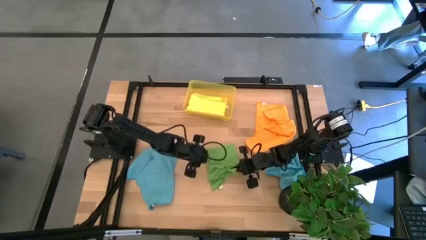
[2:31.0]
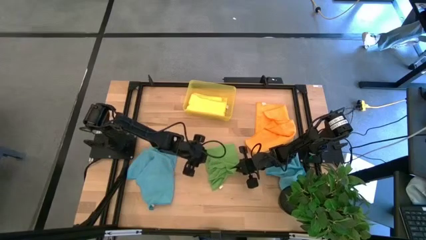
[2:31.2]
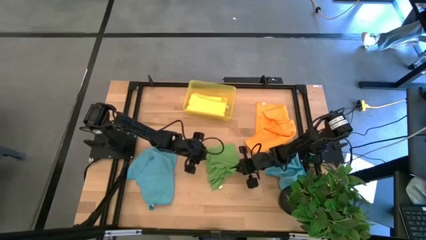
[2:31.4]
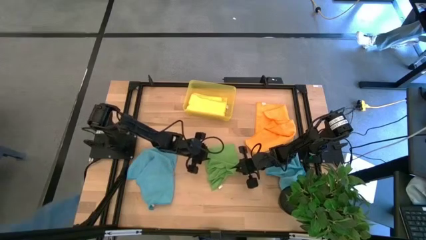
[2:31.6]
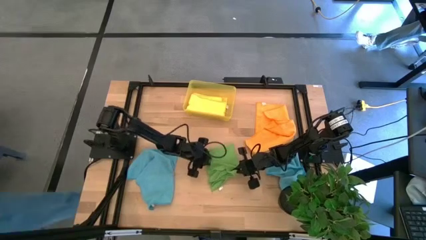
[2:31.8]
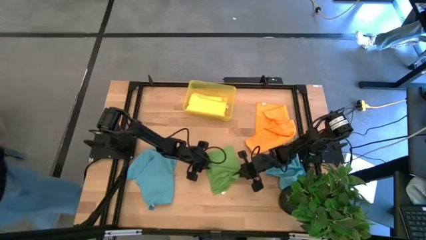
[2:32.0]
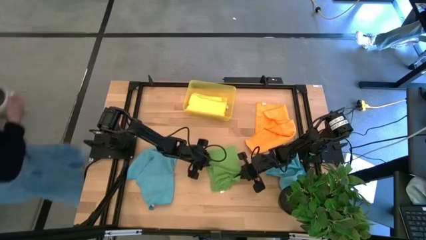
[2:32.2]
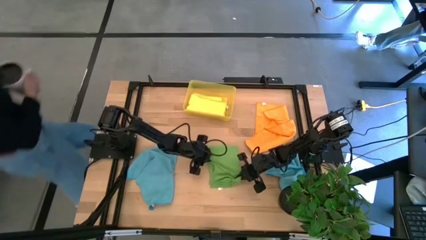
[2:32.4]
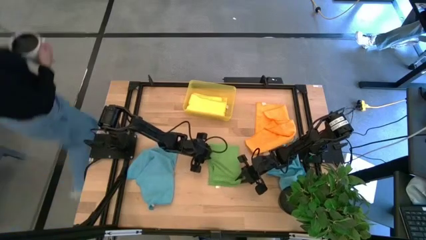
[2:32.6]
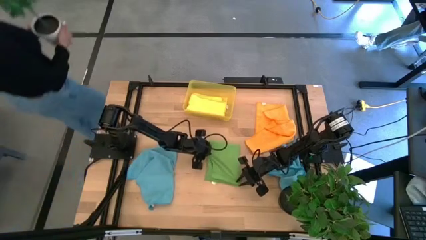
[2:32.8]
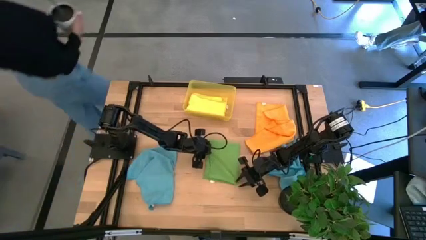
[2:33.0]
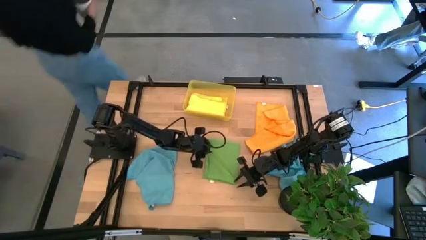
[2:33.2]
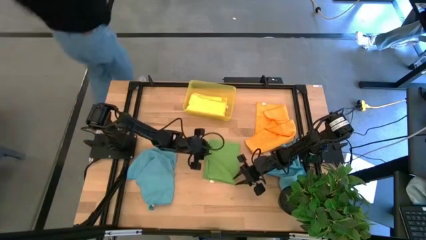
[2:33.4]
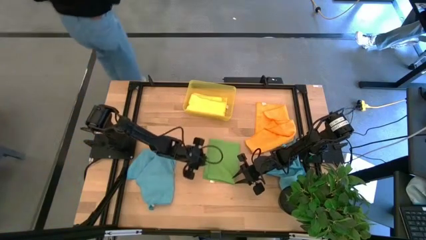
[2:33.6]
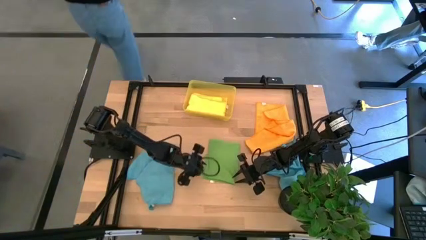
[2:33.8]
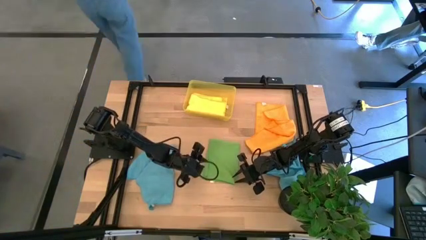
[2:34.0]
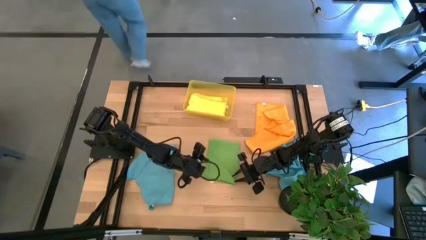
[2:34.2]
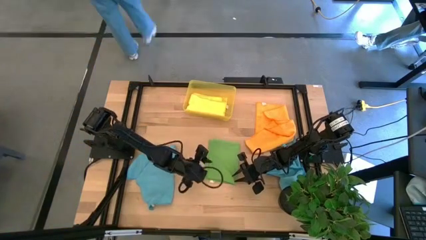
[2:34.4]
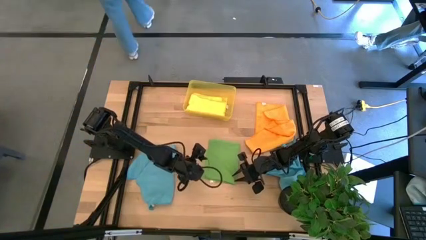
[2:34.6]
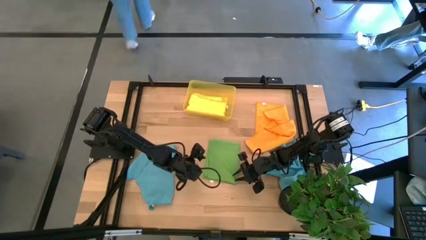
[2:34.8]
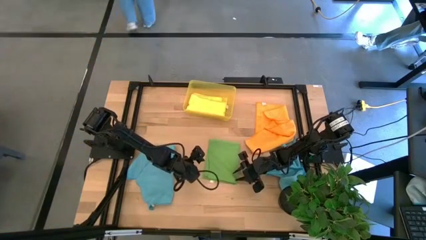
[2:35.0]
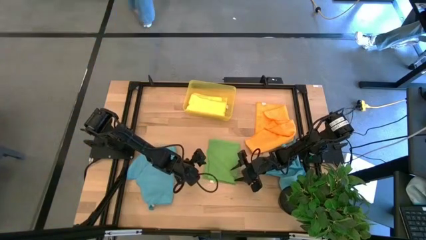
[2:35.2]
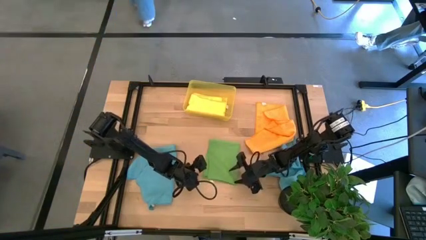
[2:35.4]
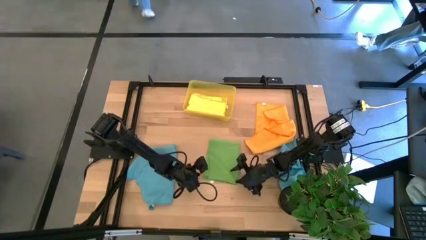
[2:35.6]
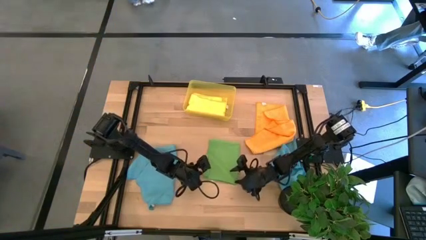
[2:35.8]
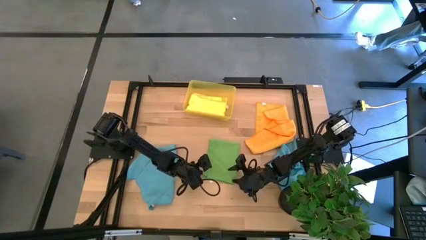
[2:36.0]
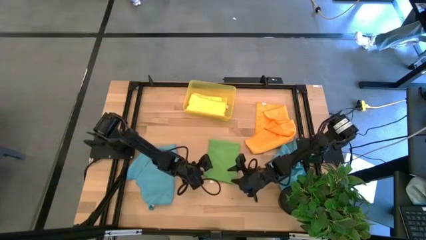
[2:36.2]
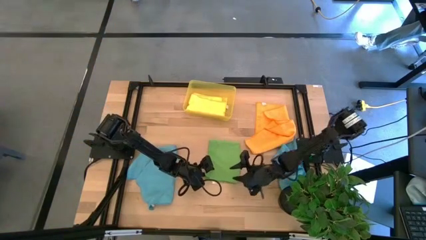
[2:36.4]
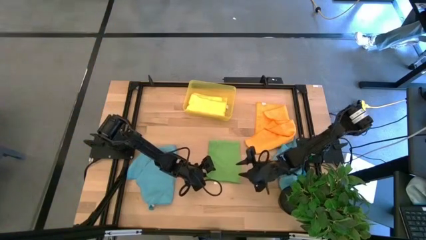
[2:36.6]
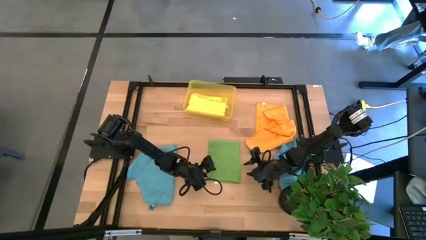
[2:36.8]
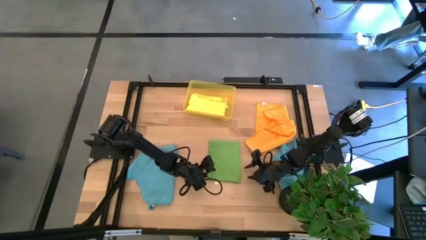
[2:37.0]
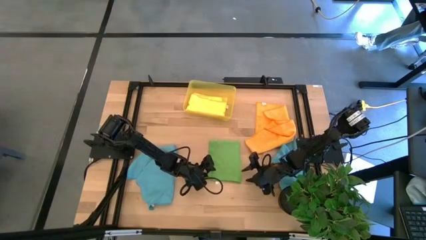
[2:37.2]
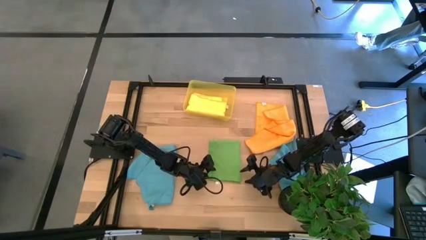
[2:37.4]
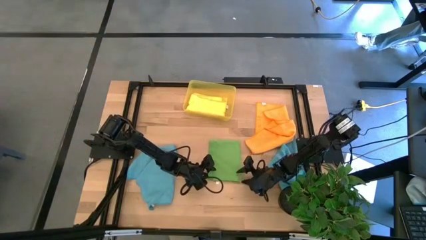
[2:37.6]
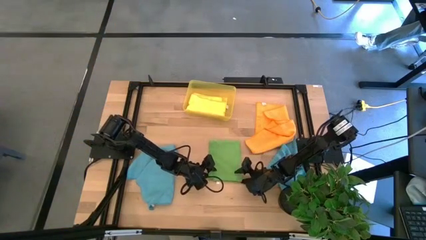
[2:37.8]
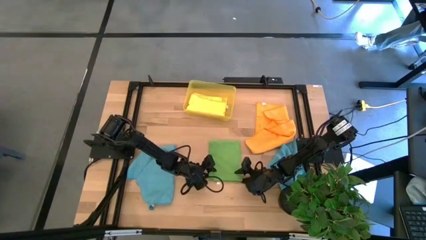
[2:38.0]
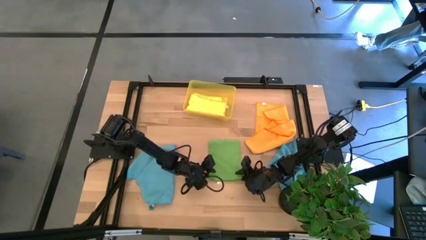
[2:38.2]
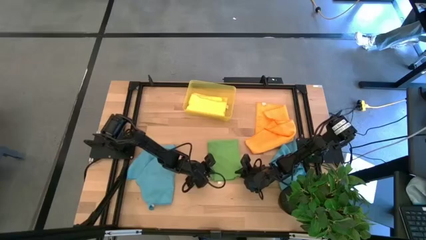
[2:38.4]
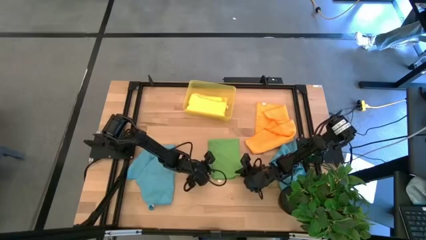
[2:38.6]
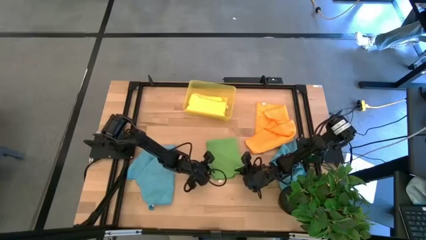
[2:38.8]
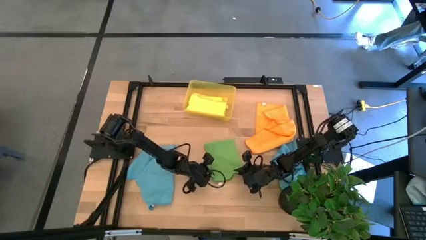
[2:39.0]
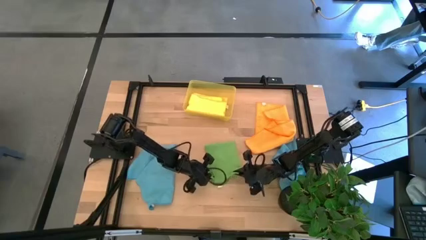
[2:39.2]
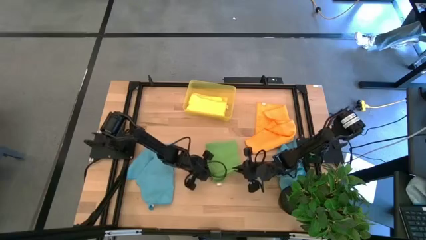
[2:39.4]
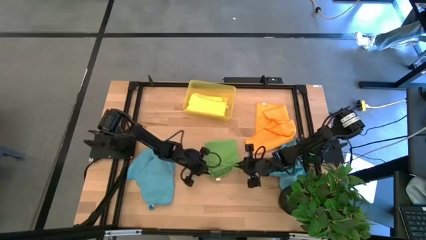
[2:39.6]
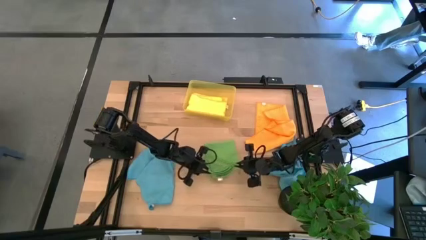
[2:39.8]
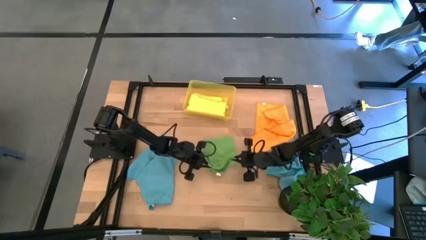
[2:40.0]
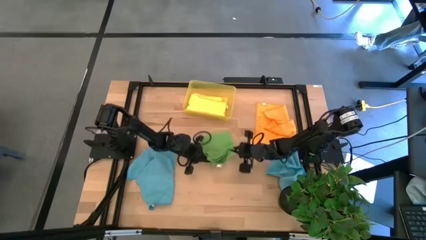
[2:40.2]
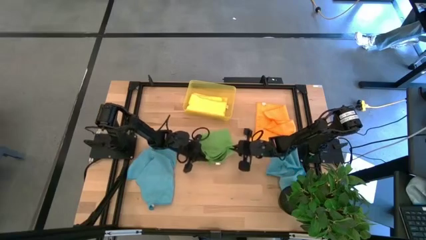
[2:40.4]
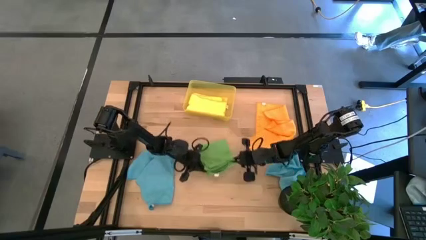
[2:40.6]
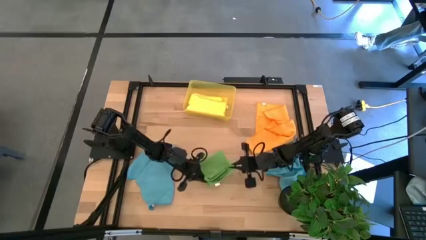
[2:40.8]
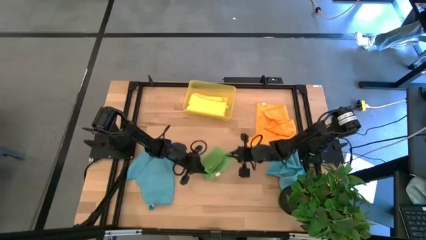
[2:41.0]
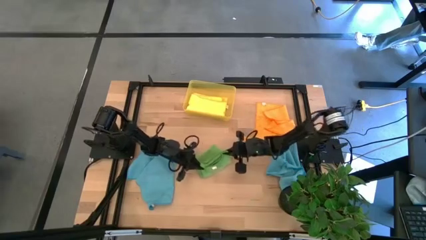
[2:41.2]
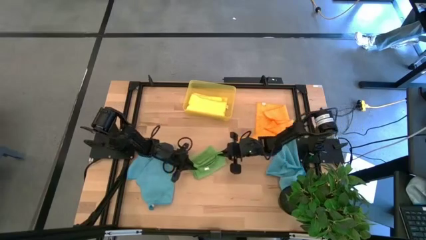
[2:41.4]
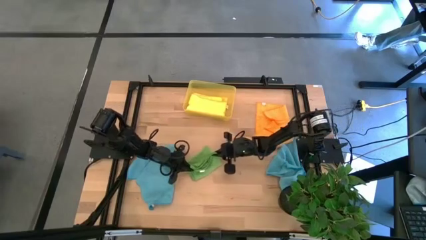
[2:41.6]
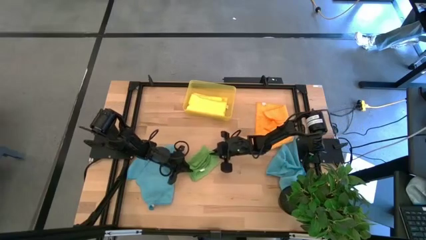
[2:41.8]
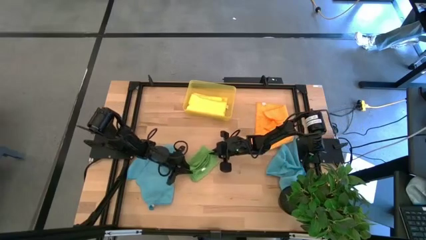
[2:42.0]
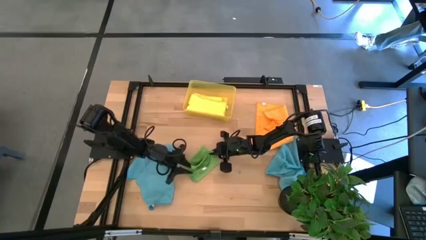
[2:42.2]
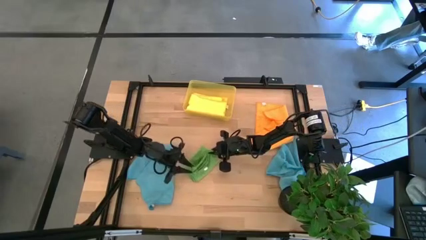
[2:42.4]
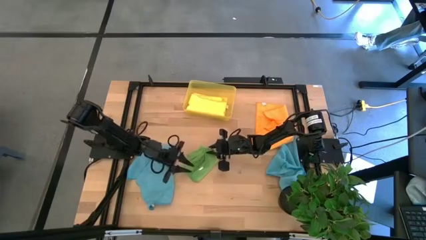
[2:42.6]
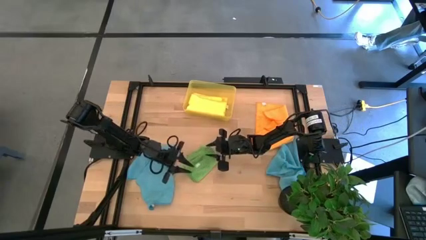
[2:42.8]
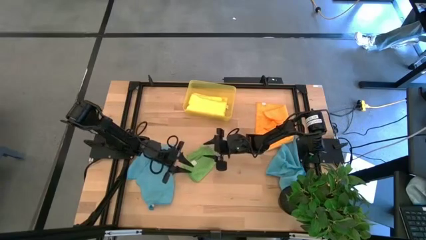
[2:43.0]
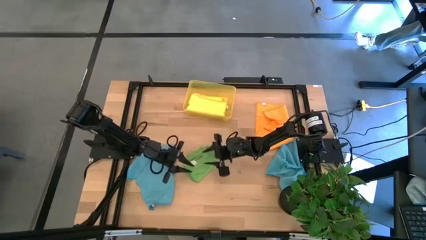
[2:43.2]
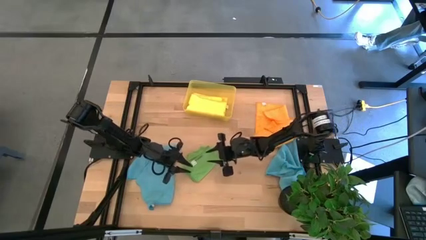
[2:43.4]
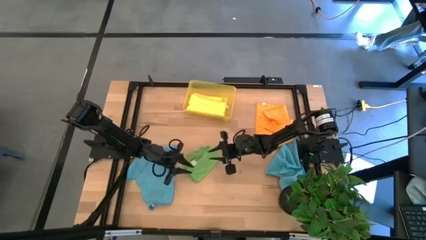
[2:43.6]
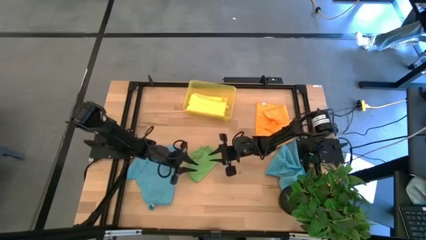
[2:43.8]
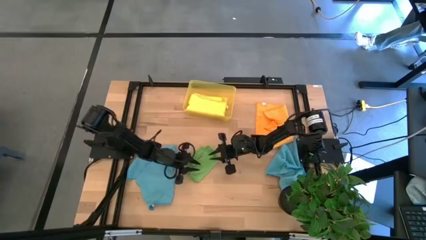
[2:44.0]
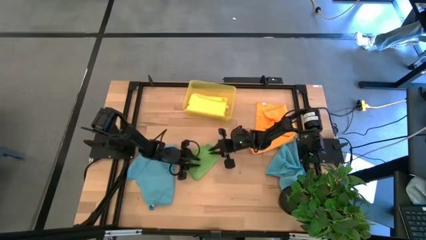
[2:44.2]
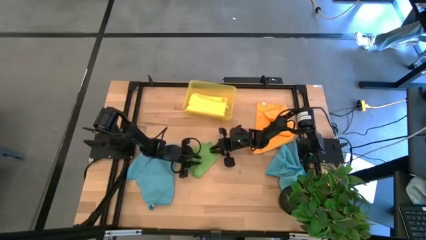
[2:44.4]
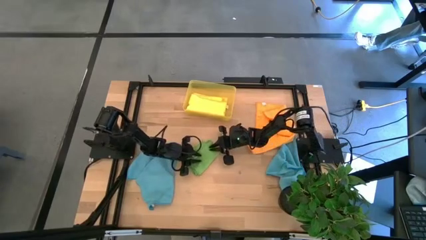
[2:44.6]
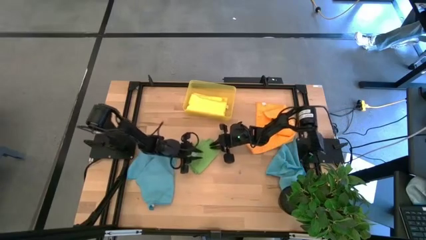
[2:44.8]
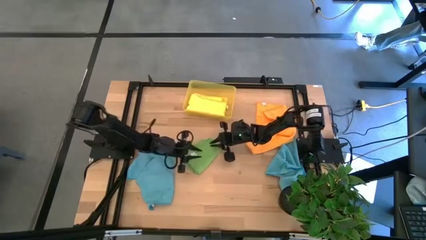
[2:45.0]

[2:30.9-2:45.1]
Task: Fold microfiber towels
Fold the green towel
